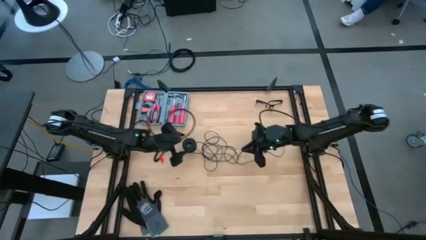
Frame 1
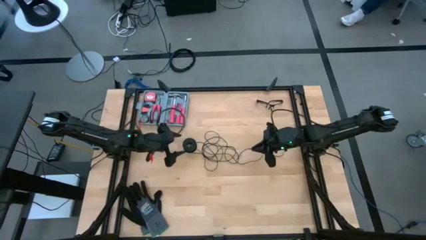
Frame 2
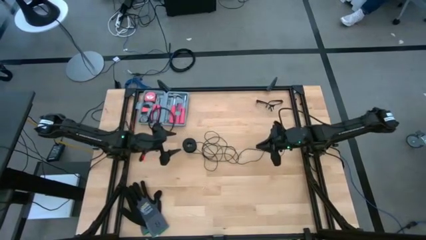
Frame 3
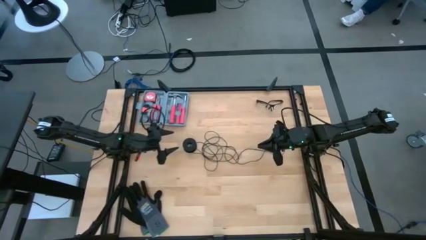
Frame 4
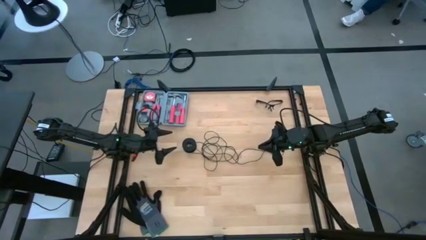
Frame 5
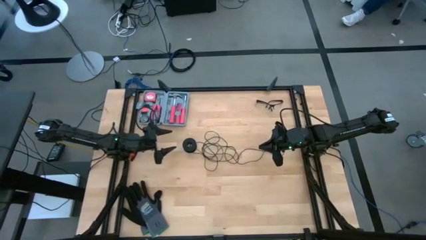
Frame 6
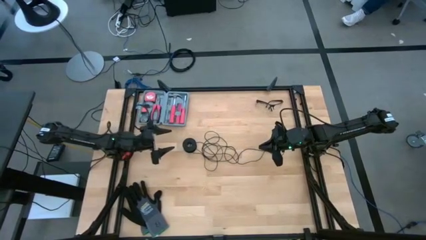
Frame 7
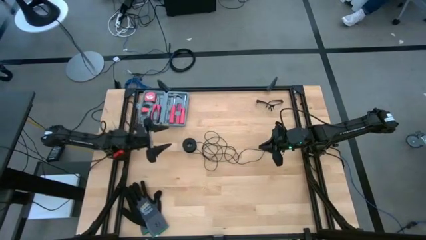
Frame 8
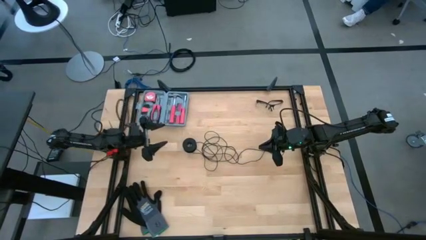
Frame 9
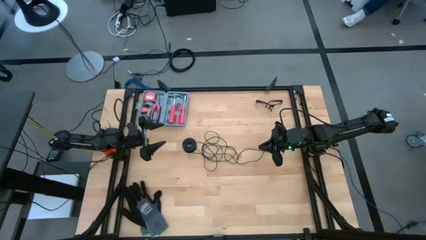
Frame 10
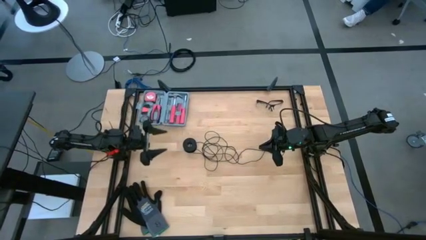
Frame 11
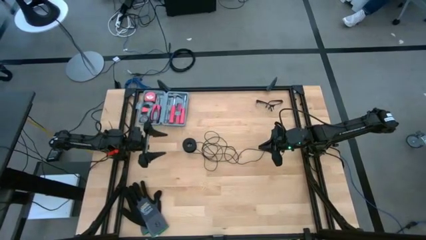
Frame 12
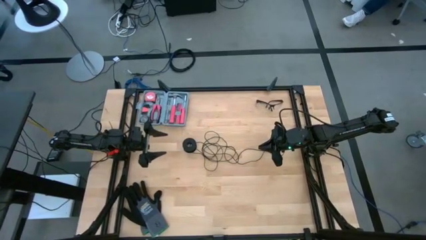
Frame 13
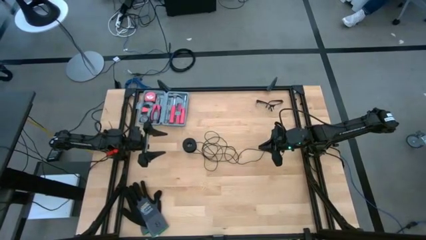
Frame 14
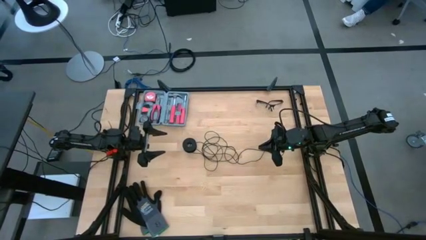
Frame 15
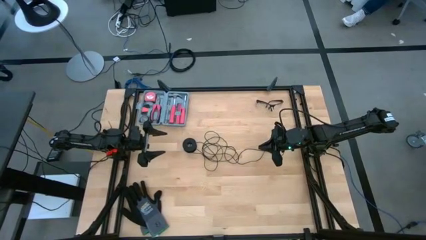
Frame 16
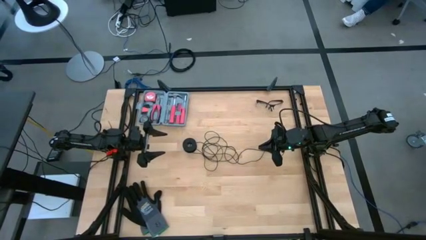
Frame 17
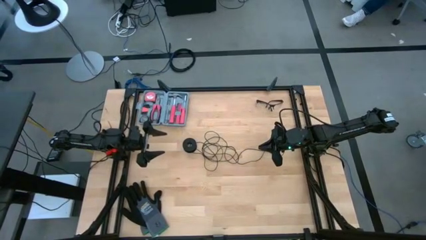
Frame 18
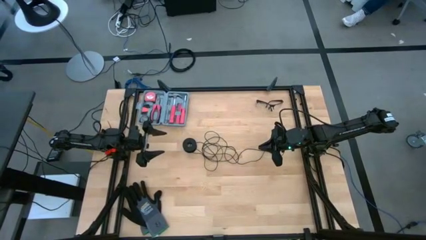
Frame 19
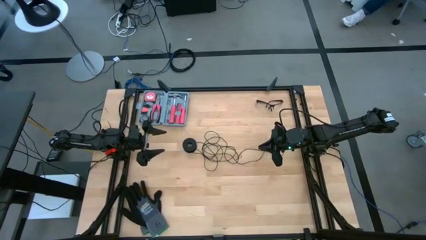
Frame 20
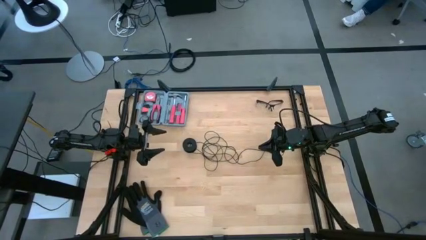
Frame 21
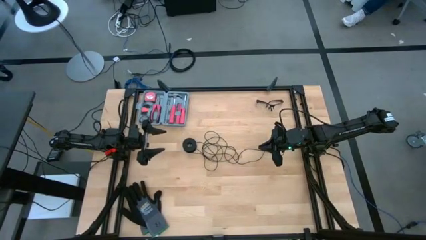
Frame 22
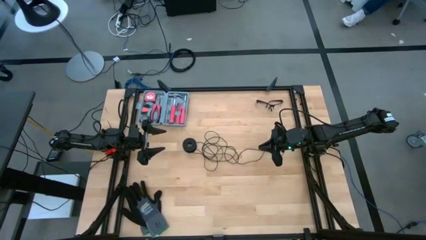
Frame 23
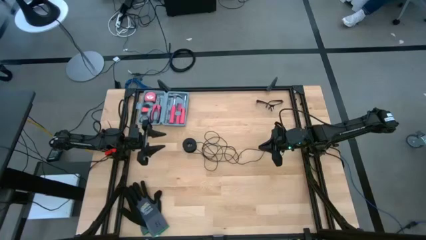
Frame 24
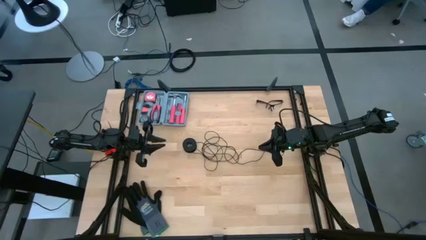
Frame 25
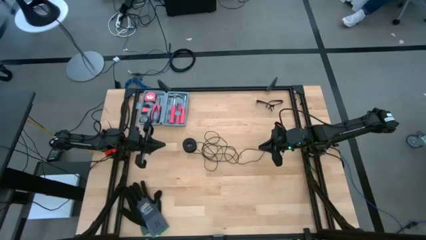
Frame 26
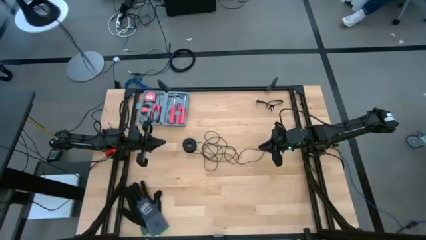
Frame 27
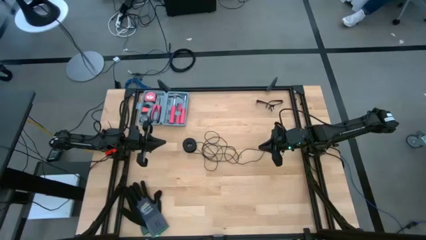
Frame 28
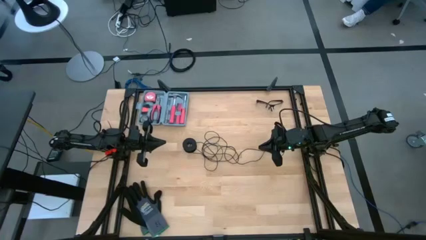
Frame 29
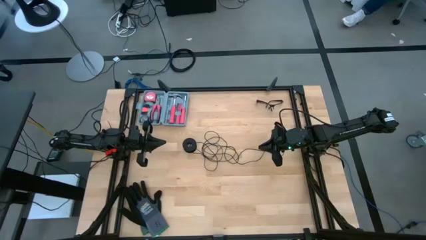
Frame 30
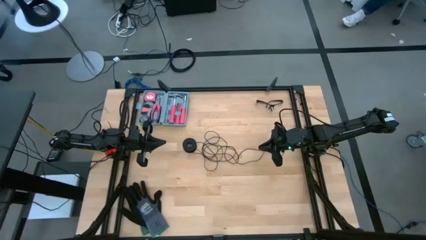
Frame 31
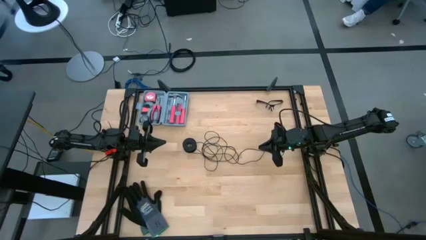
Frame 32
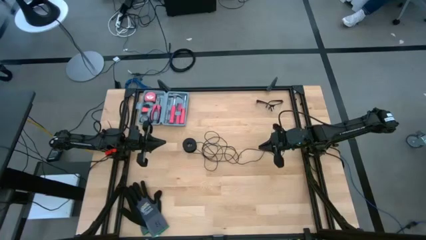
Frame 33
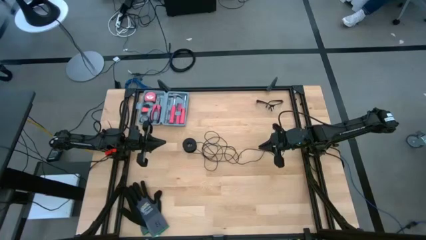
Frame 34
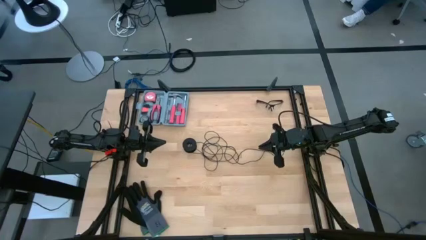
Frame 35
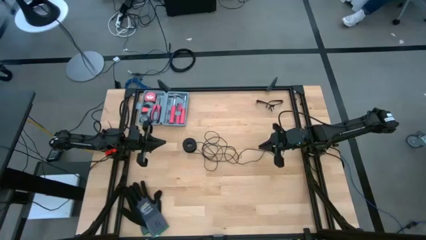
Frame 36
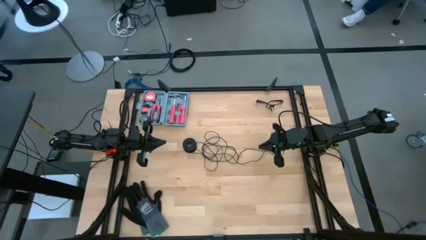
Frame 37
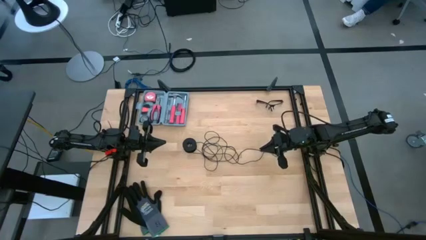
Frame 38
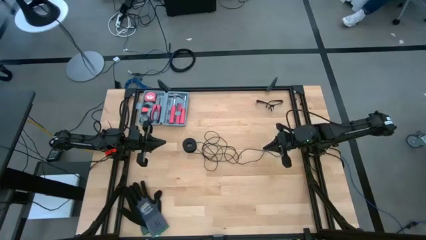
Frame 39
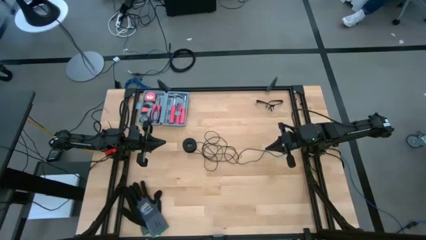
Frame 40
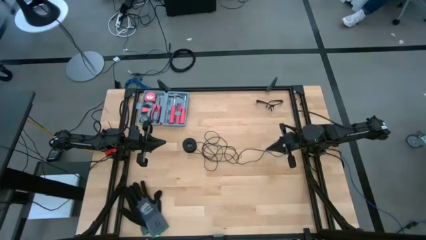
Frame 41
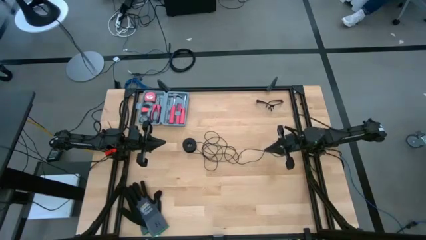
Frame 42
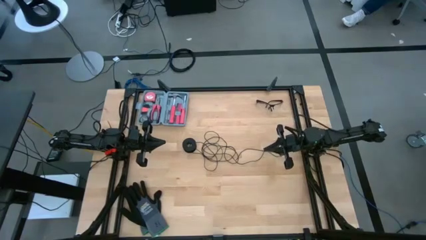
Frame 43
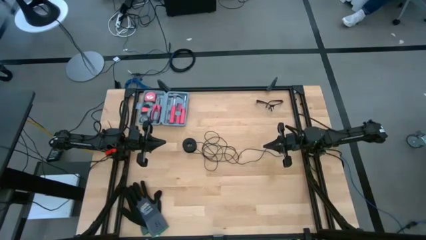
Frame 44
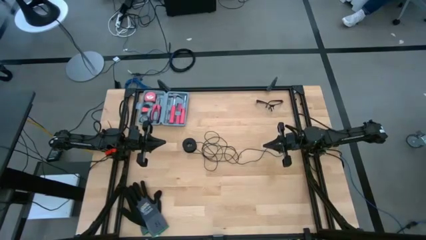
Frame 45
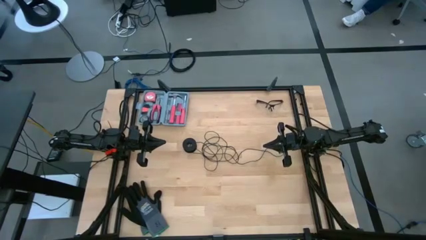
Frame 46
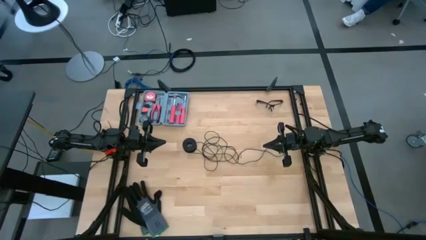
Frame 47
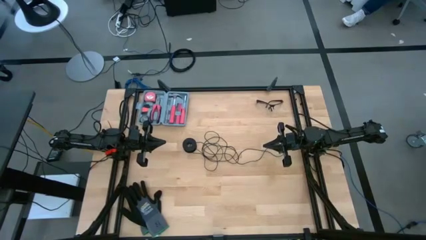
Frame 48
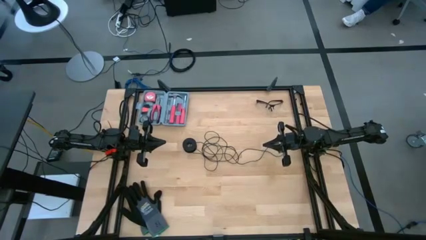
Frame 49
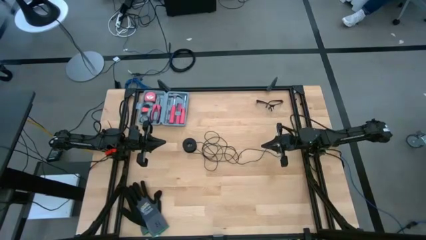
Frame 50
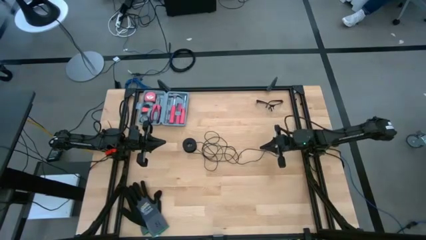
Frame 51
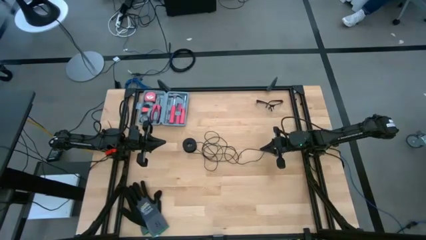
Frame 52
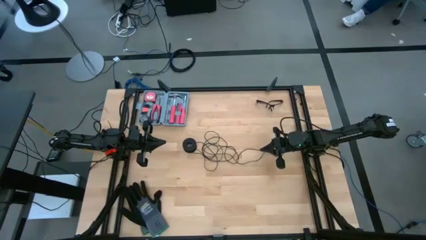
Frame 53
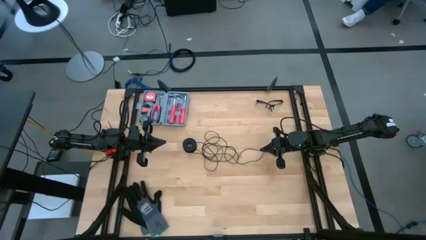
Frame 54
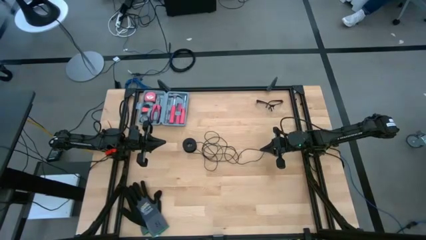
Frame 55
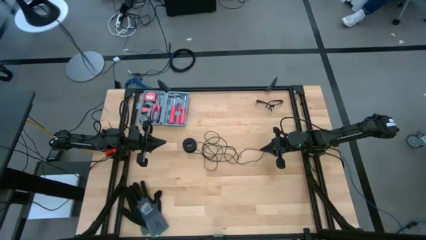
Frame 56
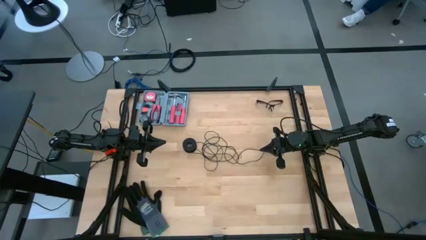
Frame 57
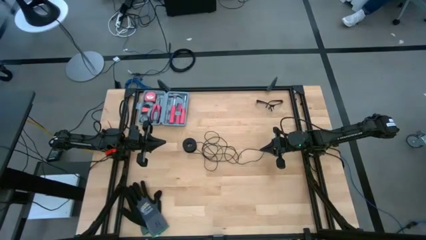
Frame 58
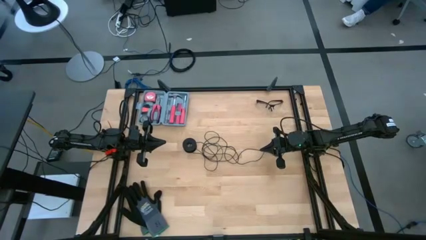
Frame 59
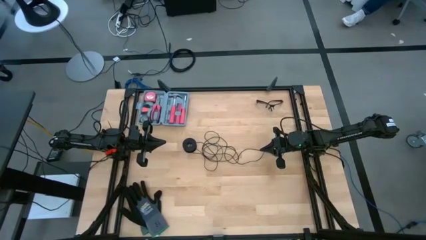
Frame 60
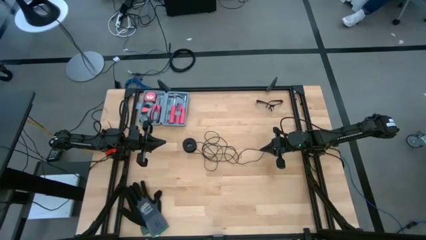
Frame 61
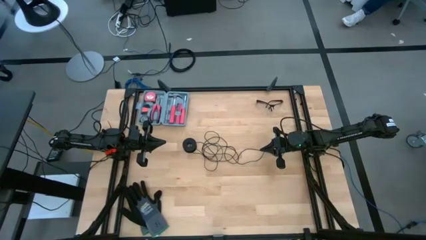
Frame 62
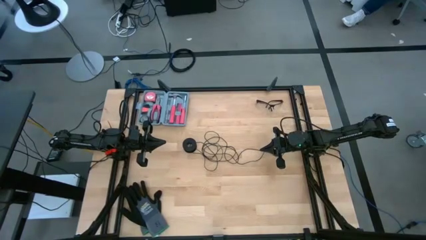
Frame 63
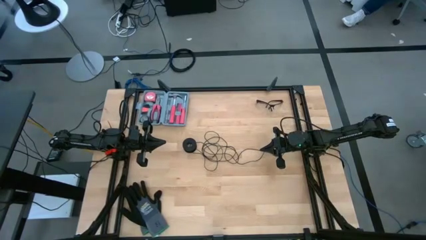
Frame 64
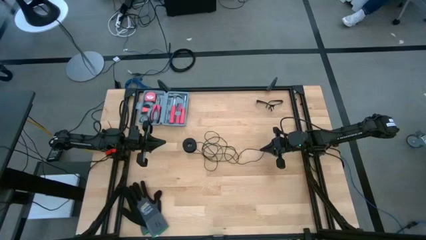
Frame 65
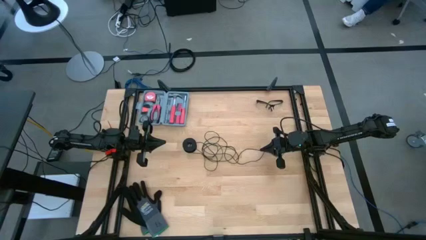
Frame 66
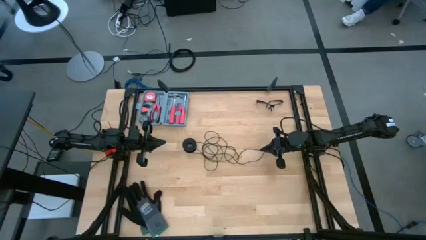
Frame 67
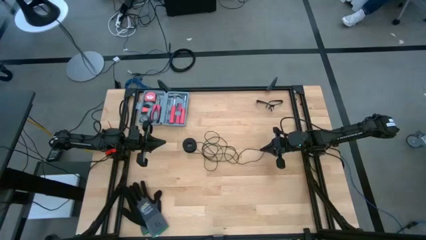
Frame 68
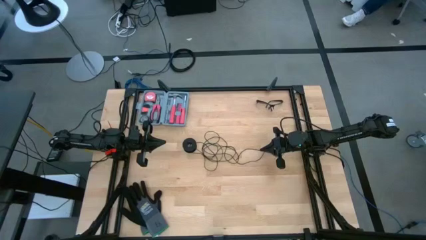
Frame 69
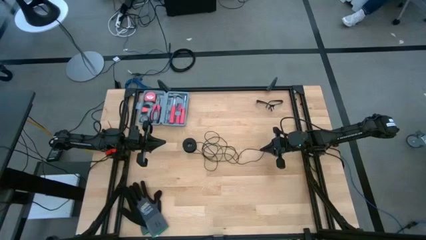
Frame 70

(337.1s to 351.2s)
Task: Coil cords
Return to Home Position

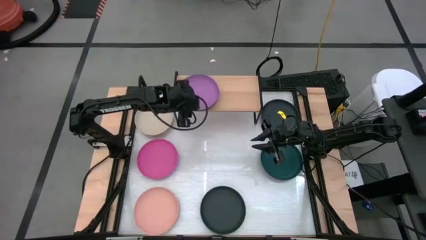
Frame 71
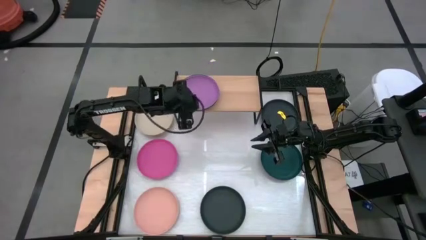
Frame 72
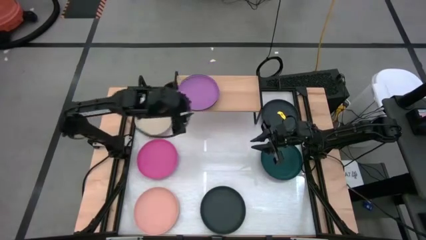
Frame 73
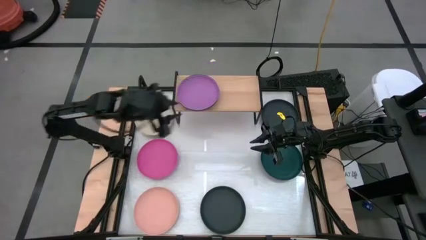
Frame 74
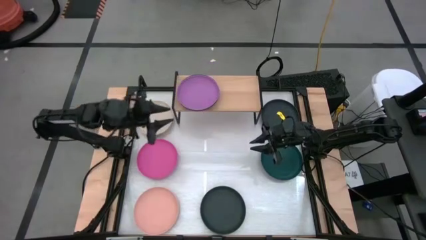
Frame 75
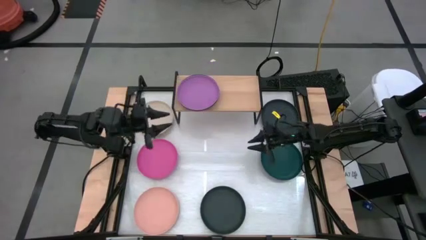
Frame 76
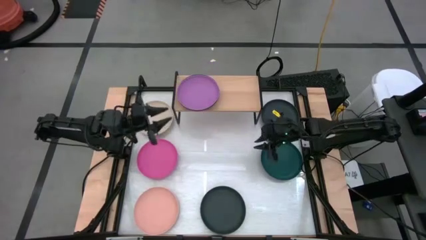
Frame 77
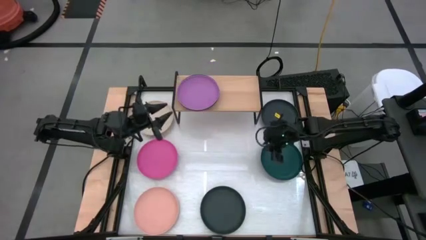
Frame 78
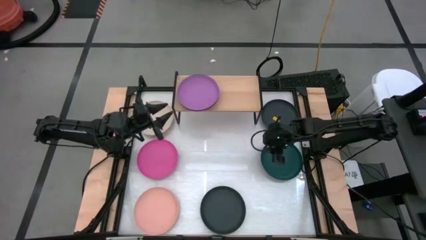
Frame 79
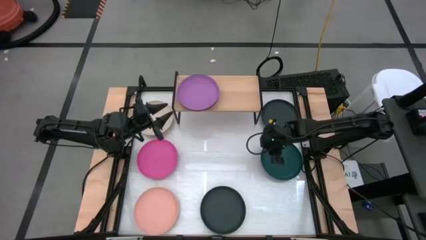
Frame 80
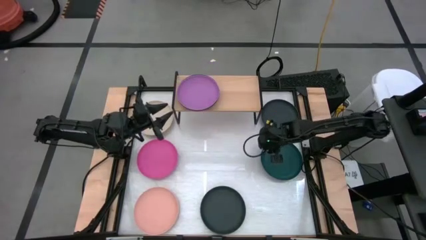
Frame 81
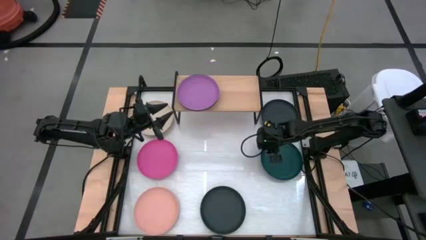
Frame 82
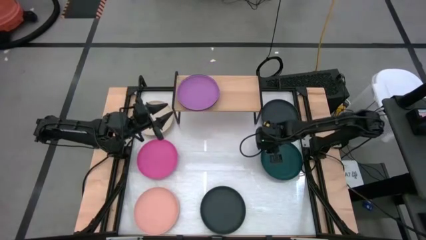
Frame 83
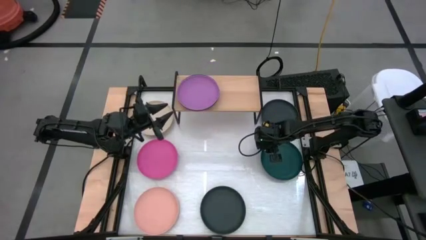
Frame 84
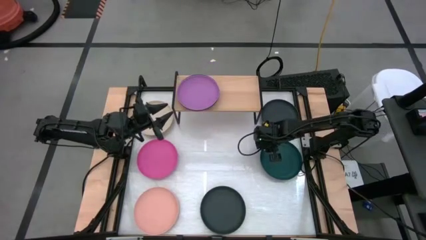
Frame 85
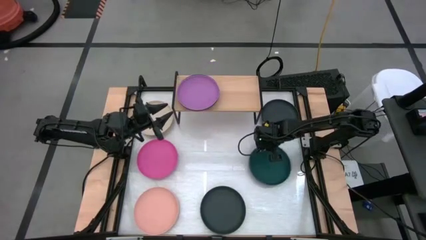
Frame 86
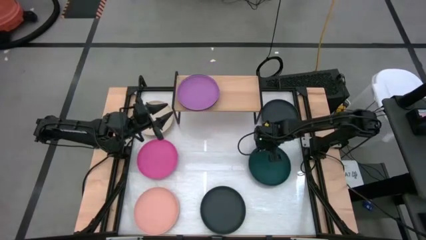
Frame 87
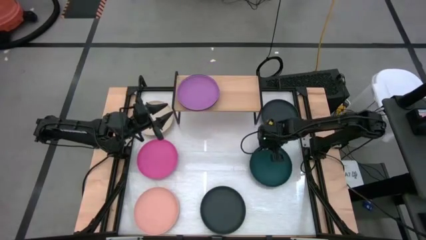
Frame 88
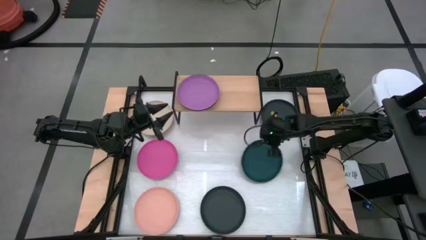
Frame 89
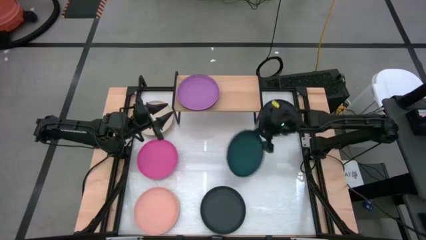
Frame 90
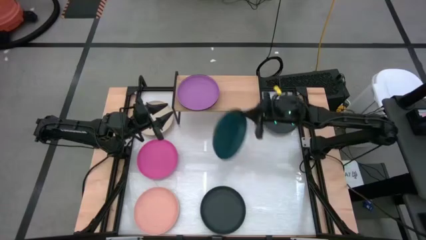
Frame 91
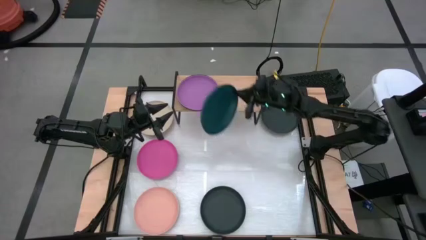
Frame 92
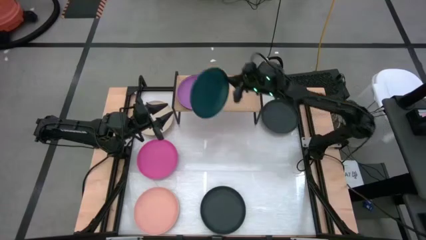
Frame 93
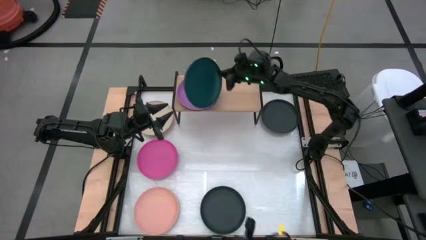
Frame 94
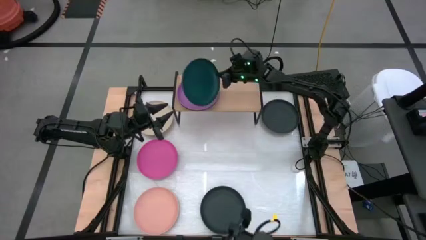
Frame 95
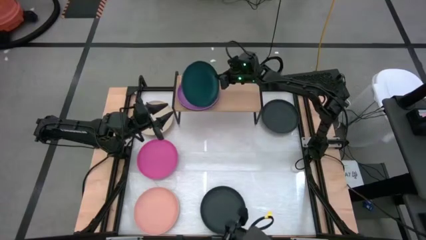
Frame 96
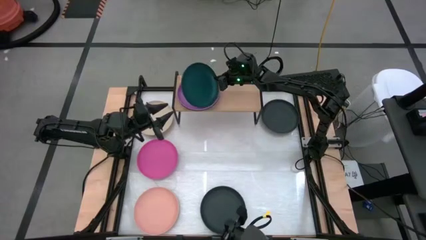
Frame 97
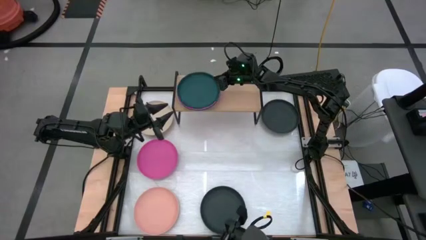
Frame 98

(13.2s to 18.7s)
Task: Place and stack plates onto a shelf
Stack the dark green plate on top of the purple plate on the shelf
